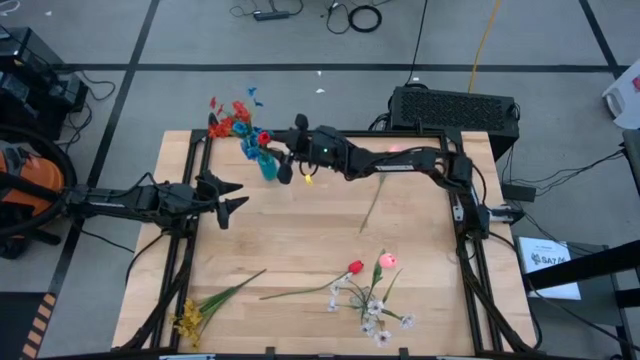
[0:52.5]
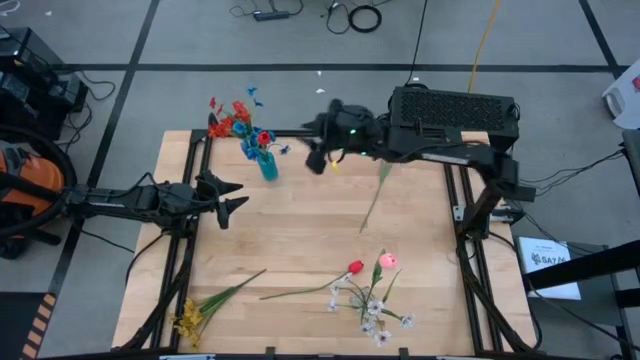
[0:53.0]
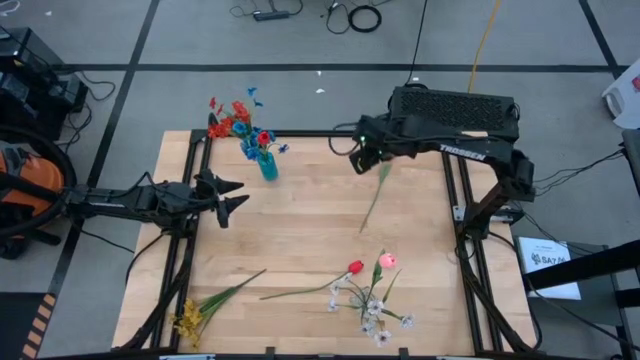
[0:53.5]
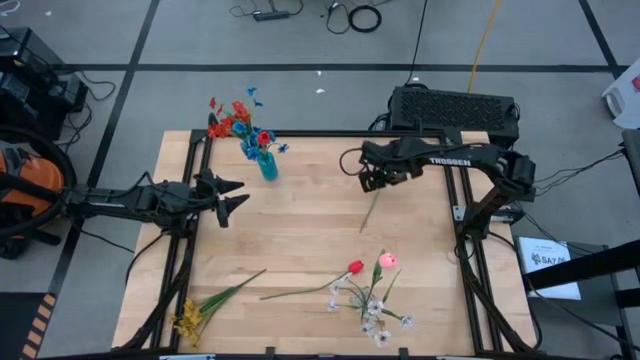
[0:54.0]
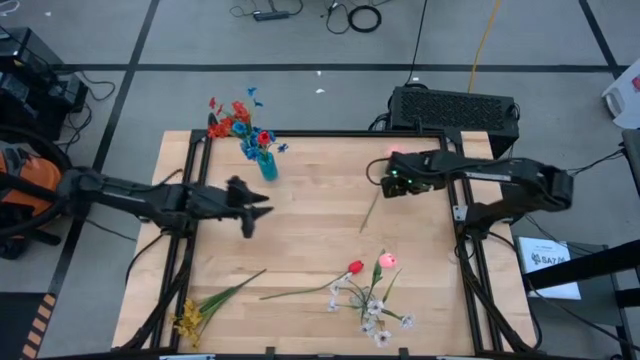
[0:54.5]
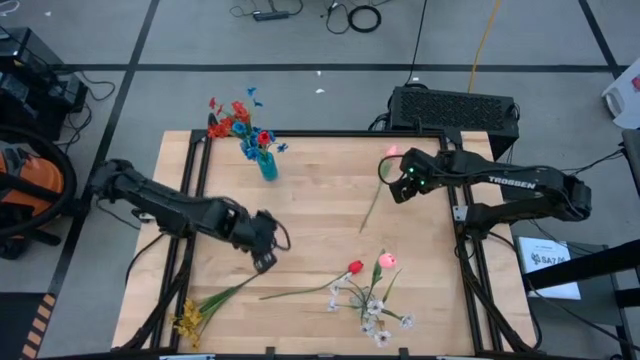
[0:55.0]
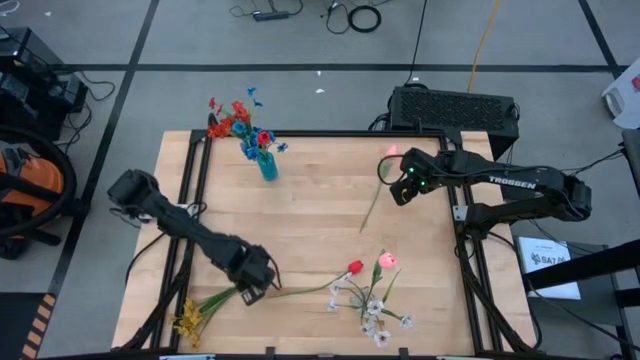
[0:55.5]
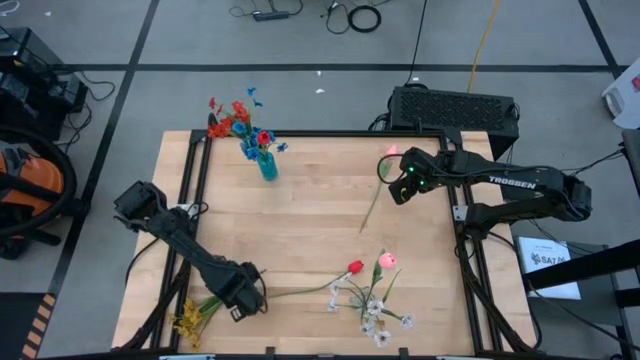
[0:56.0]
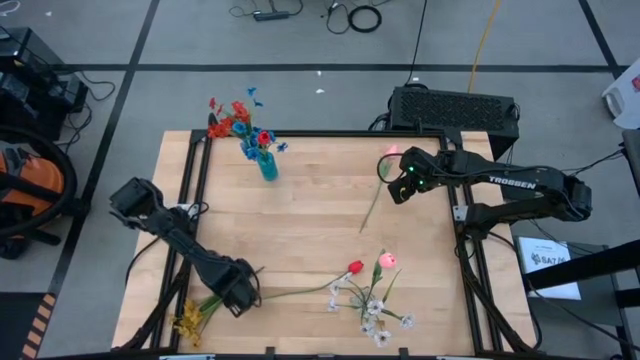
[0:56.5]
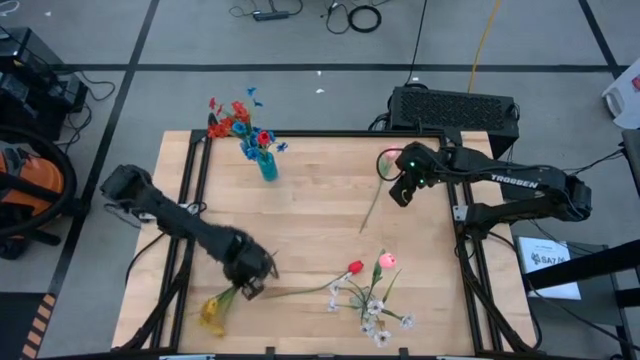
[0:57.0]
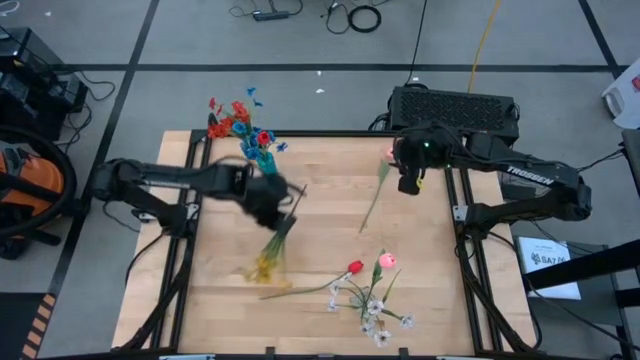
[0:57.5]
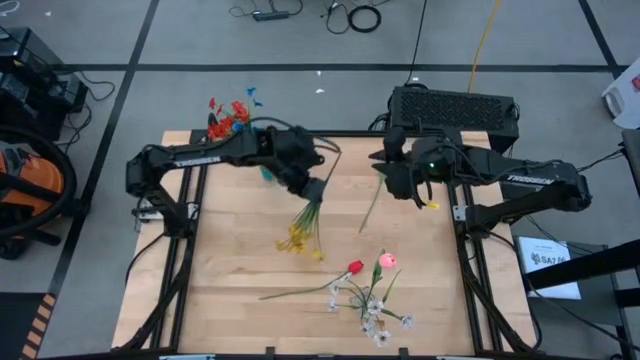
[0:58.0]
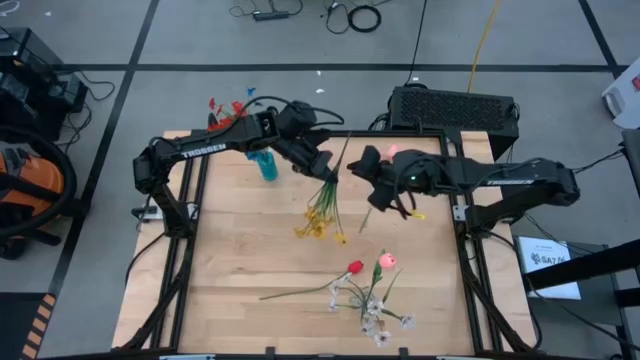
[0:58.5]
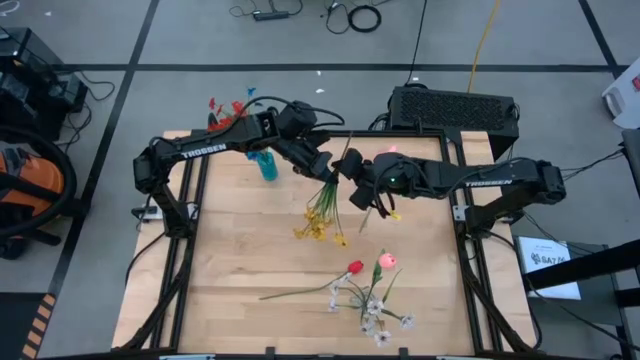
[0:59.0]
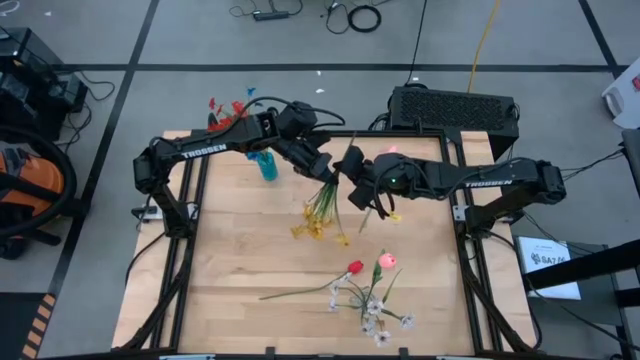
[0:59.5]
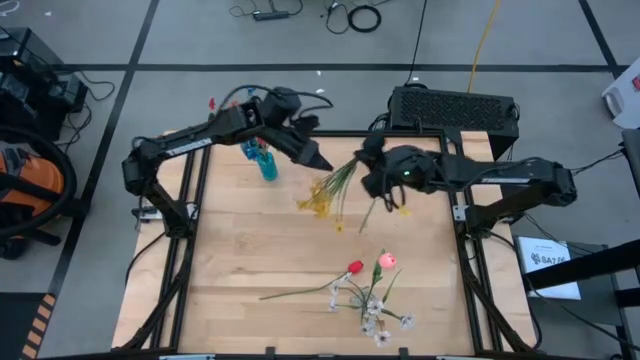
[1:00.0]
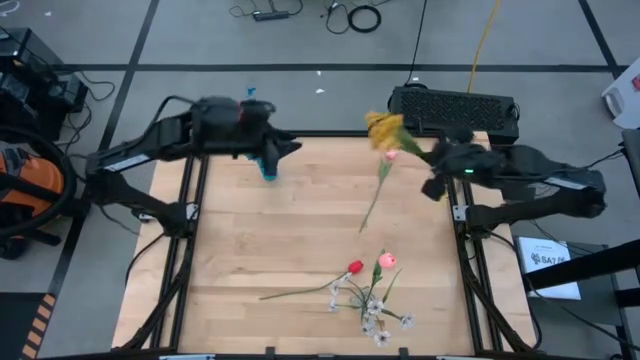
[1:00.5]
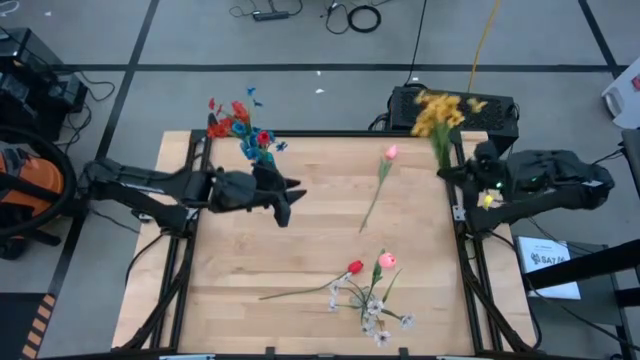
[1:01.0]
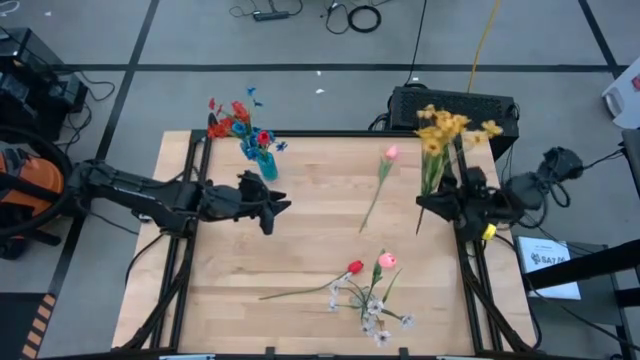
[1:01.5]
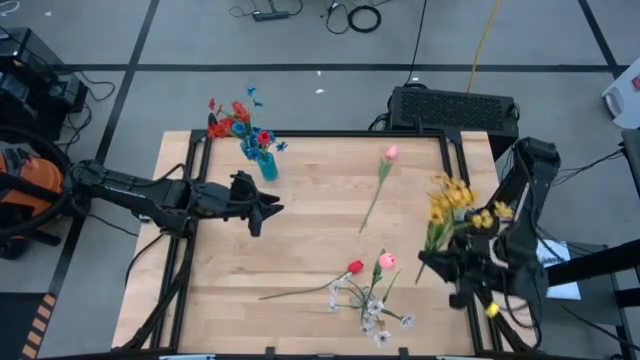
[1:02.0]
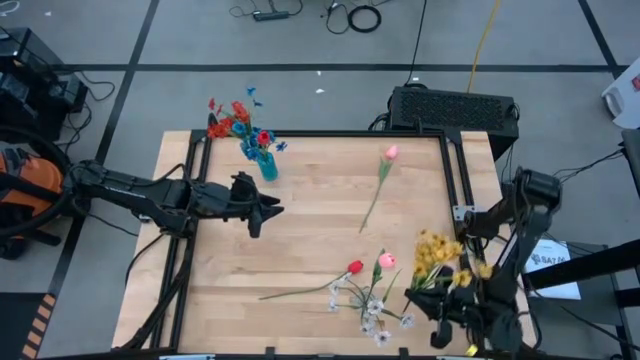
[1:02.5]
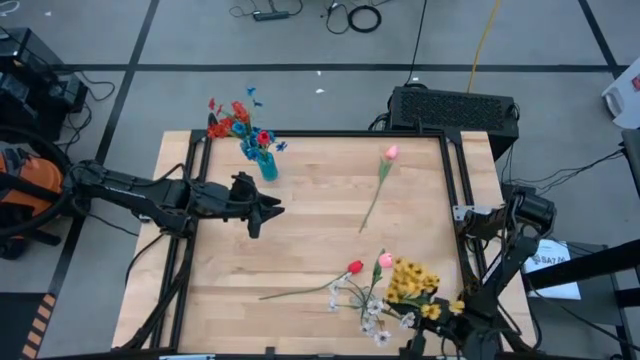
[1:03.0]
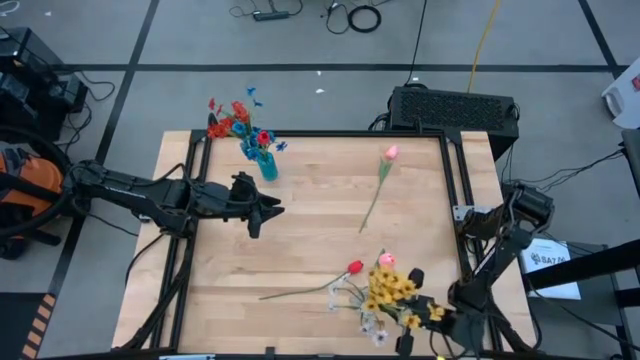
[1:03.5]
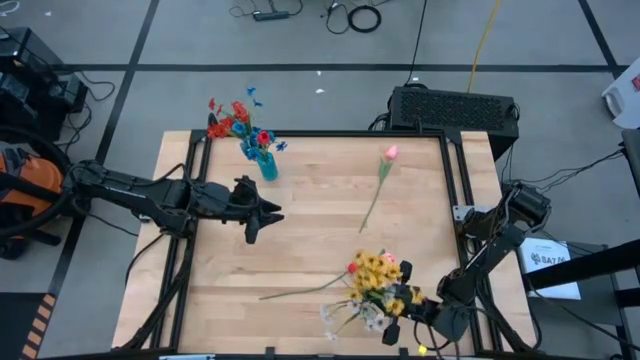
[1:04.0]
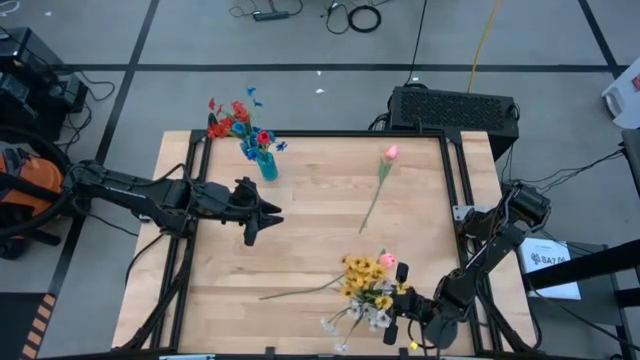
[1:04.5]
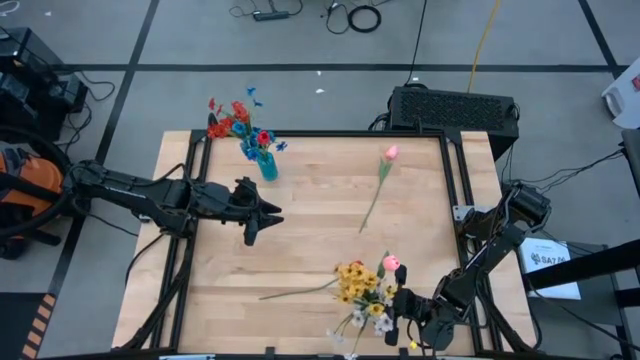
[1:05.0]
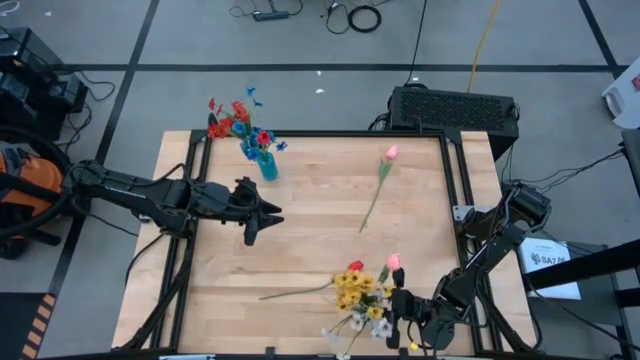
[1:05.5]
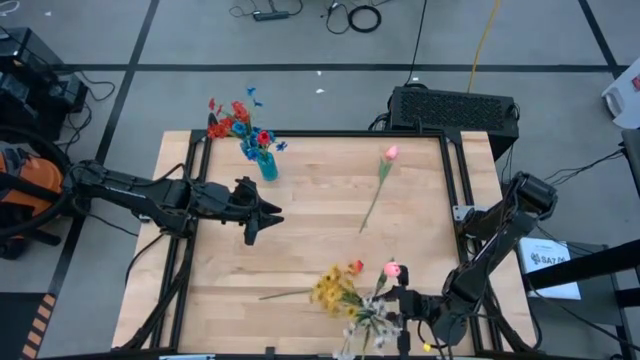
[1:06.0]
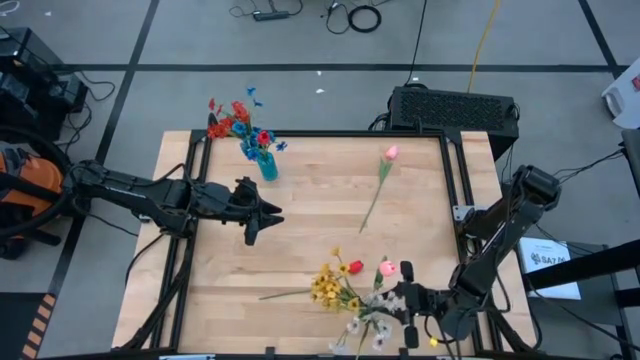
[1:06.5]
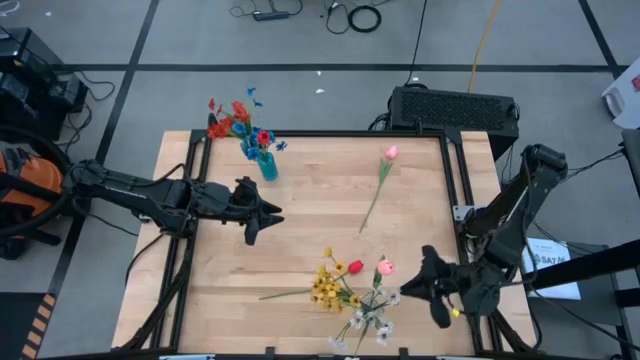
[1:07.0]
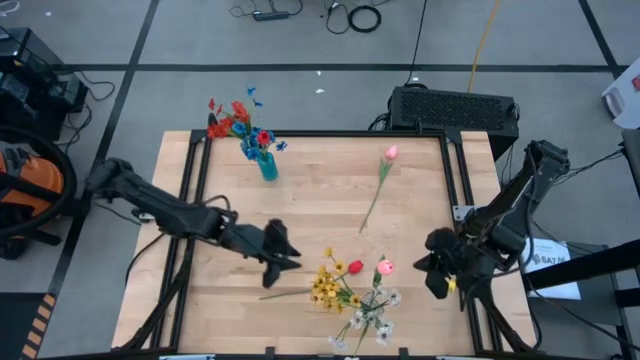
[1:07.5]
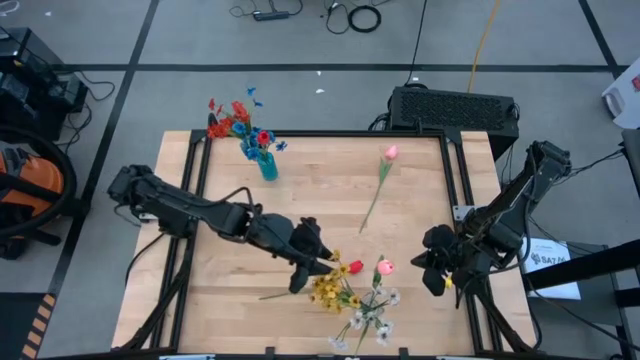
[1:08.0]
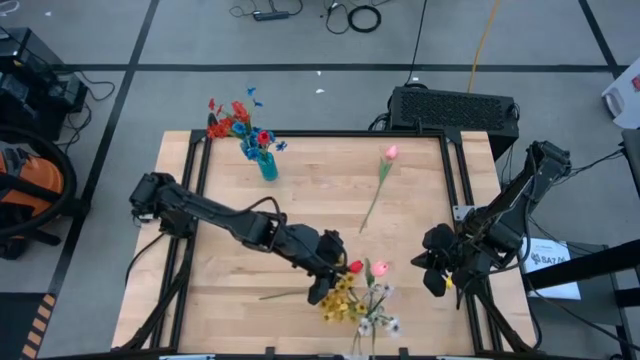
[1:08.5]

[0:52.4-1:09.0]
Task: Sort flowers into vase by color
Put the yellow flower into the transparent vase

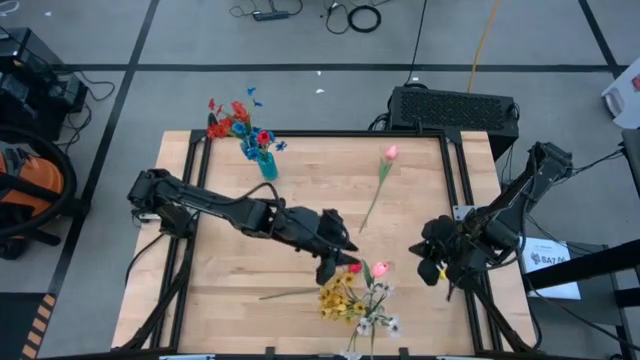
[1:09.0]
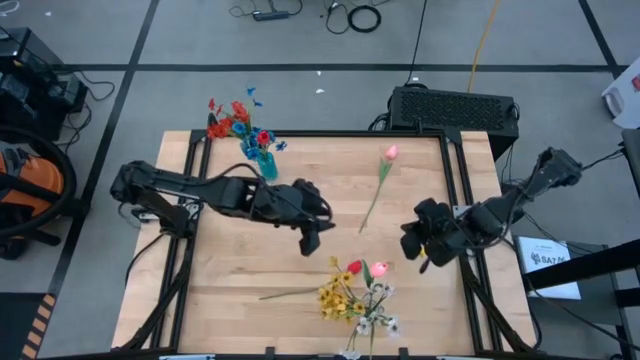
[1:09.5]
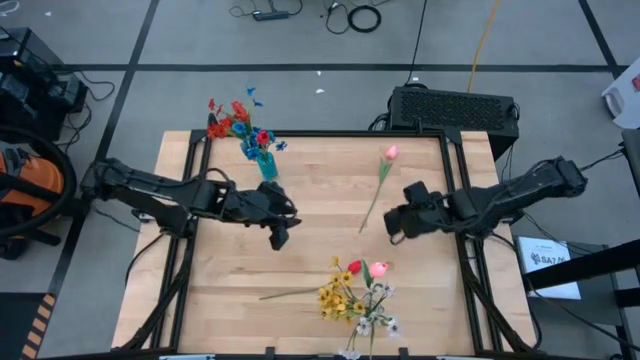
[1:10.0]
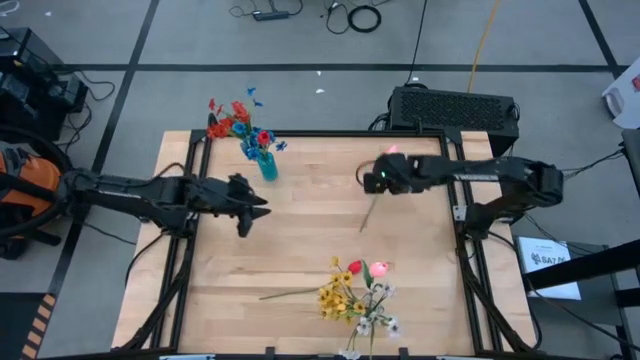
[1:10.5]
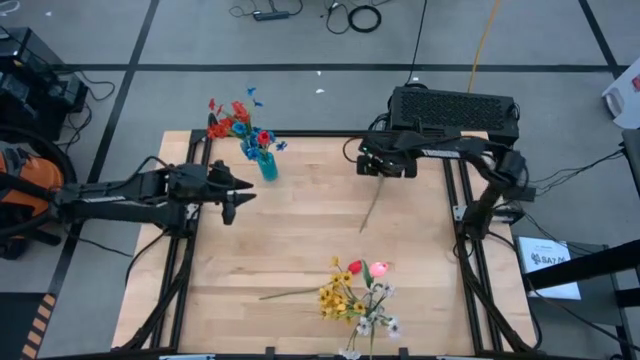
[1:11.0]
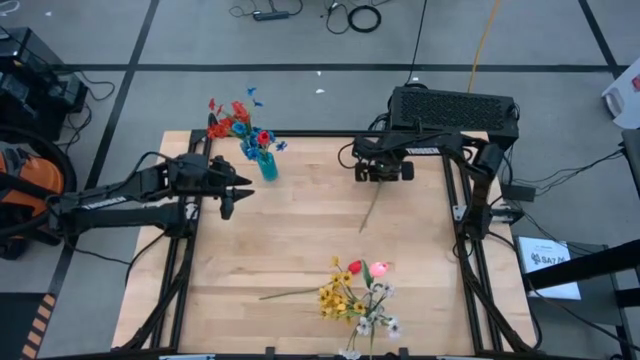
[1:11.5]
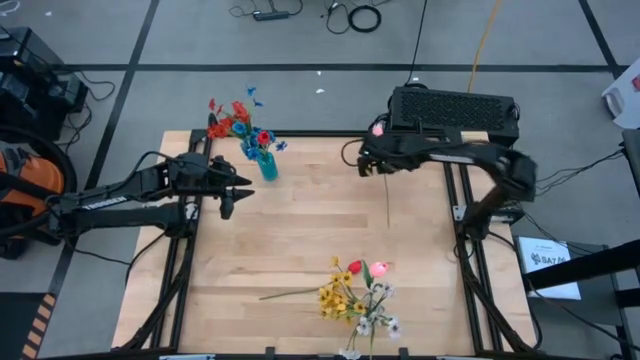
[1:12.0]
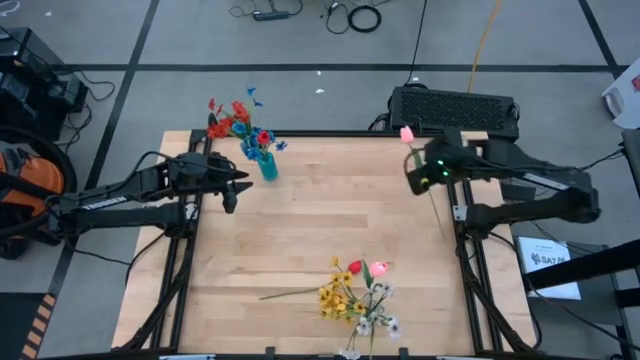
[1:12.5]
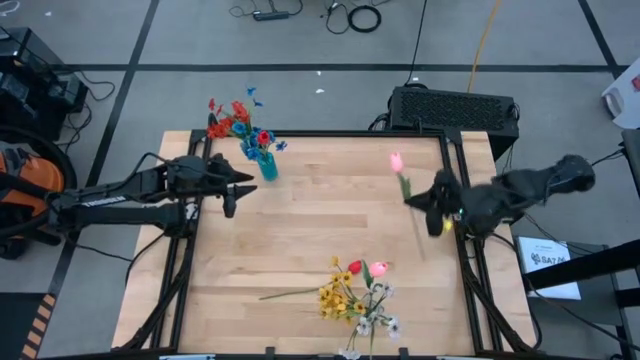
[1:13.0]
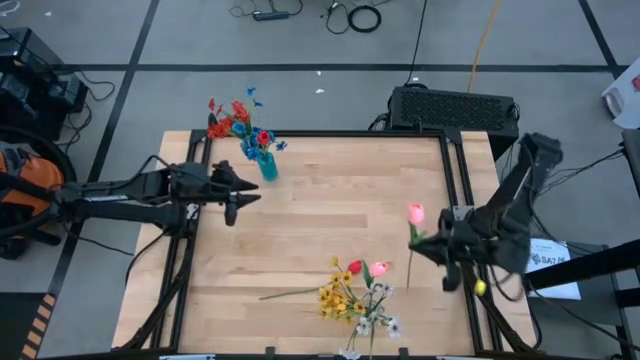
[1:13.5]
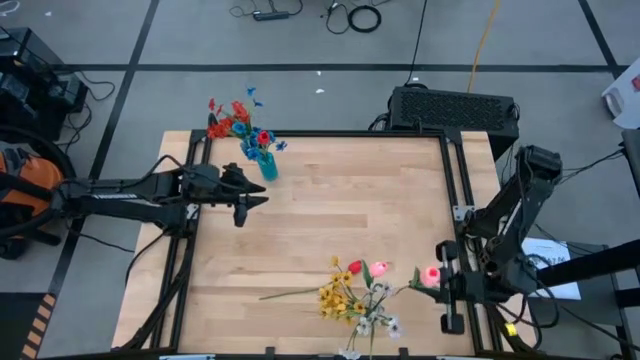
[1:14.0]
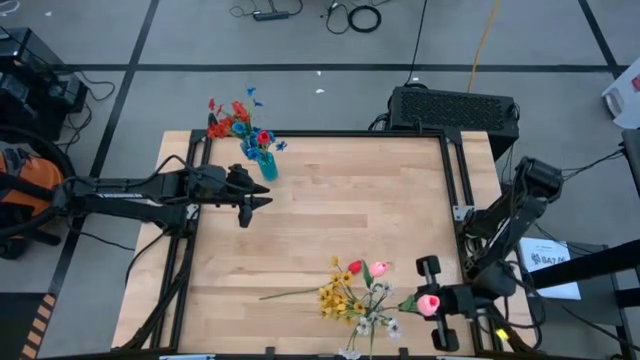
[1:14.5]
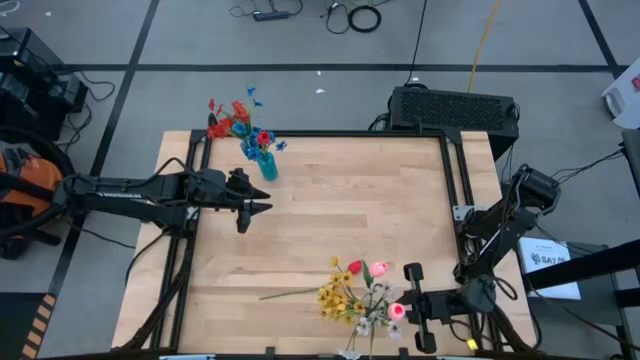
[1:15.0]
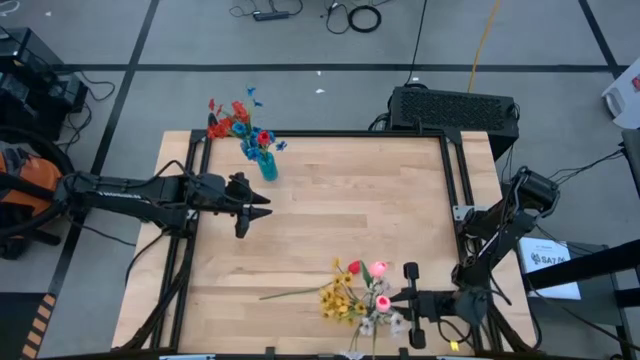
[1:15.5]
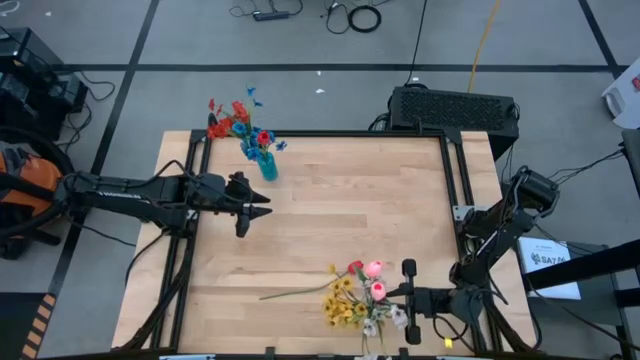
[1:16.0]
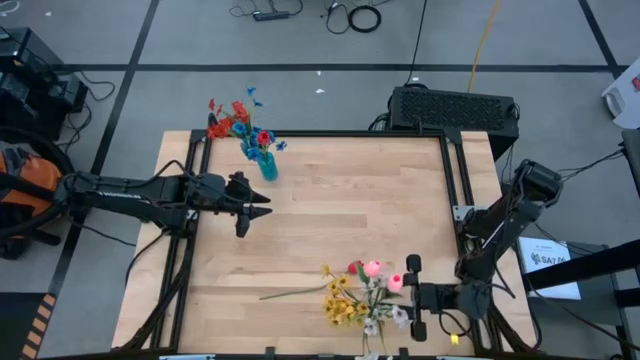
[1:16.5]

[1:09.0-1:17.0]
Put the pink flower into the transparent vase
